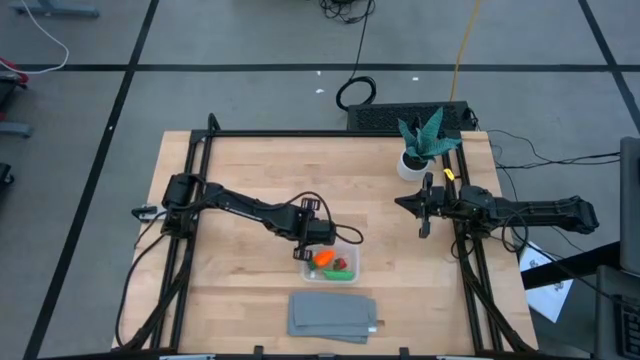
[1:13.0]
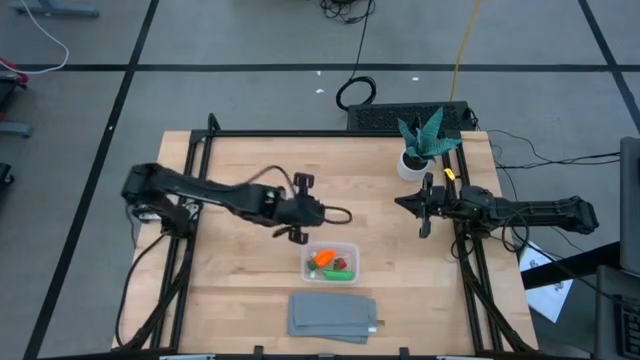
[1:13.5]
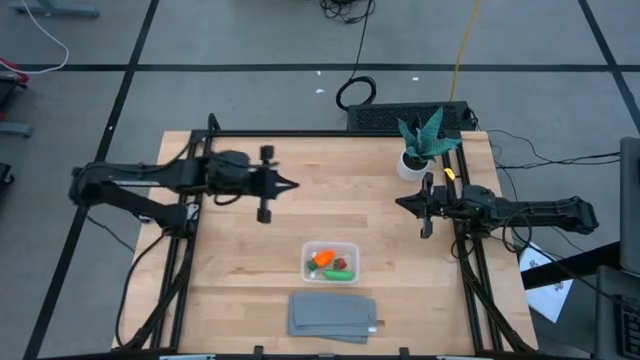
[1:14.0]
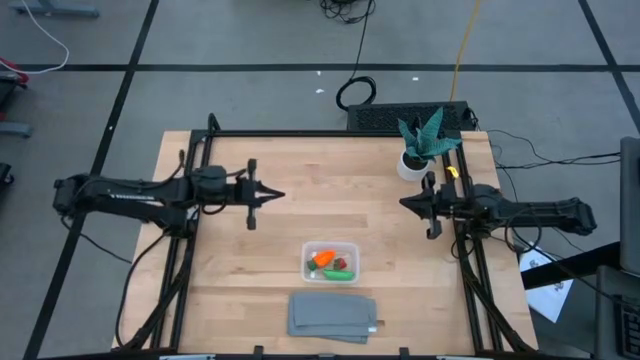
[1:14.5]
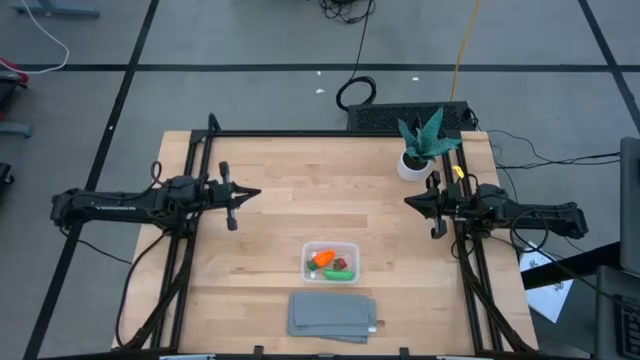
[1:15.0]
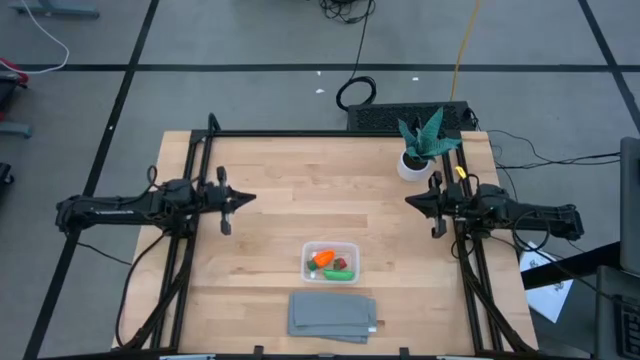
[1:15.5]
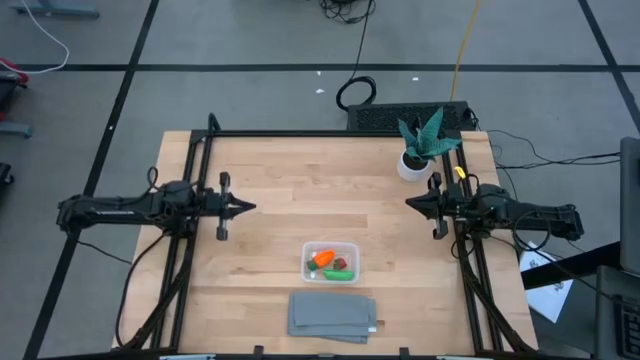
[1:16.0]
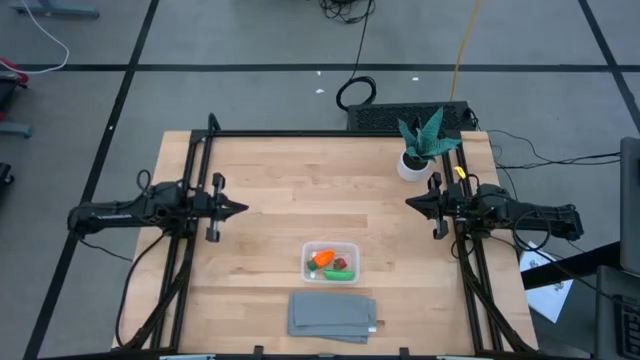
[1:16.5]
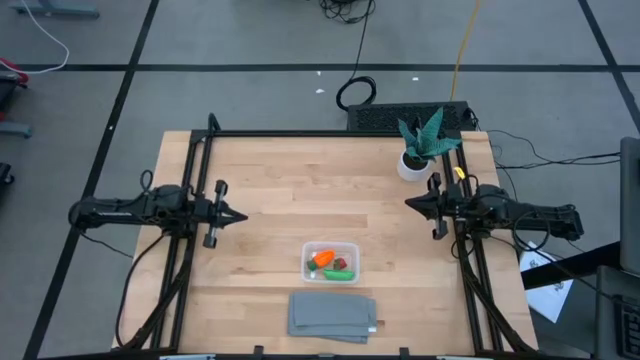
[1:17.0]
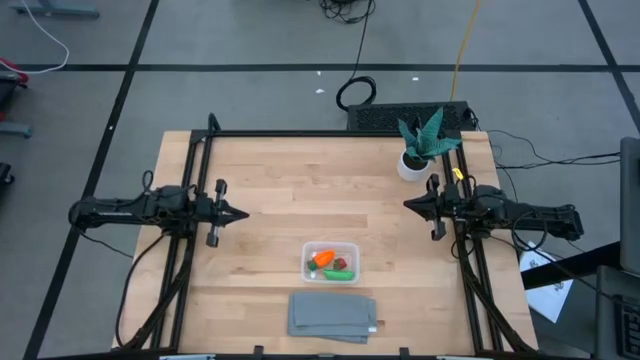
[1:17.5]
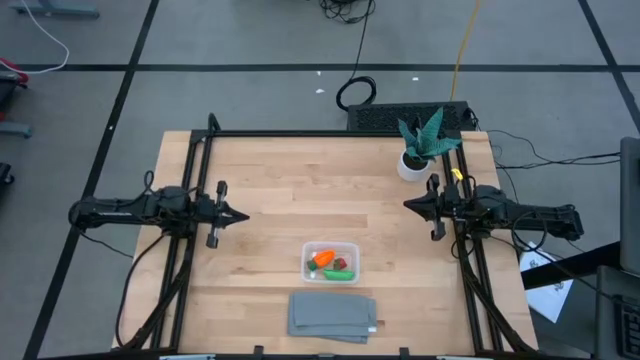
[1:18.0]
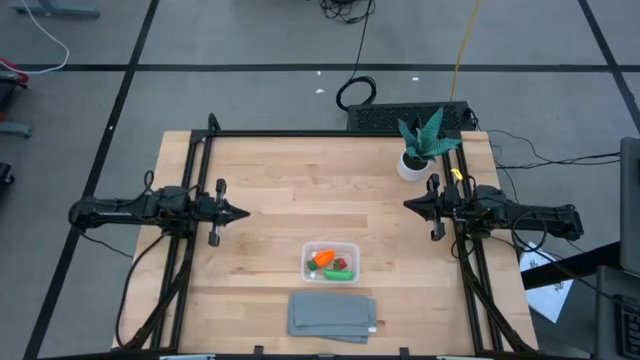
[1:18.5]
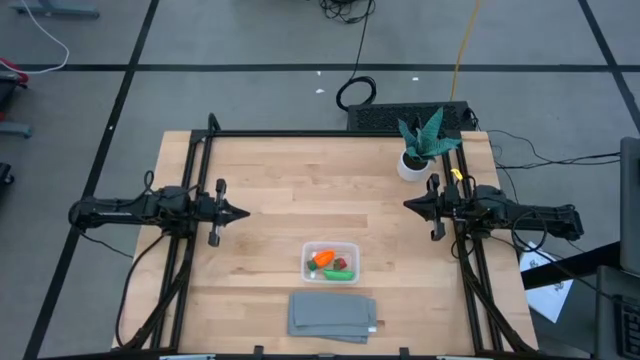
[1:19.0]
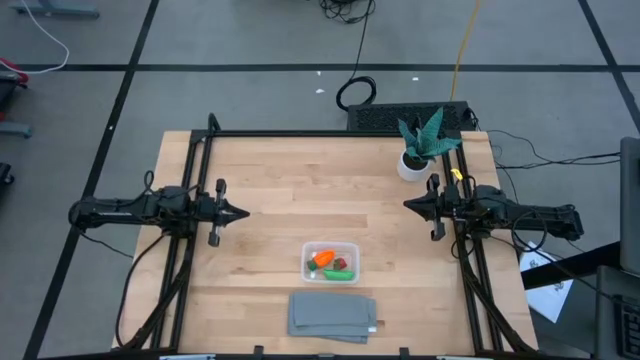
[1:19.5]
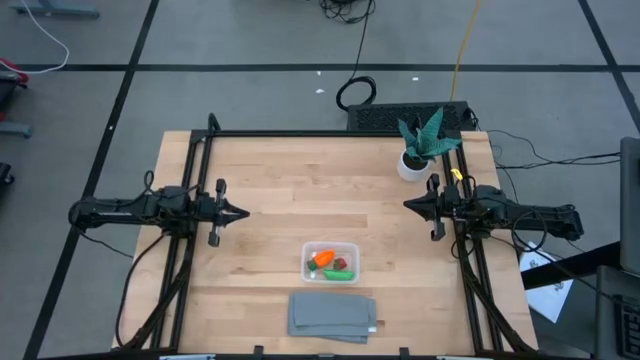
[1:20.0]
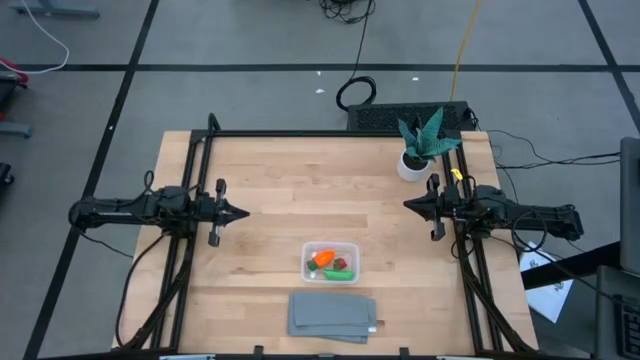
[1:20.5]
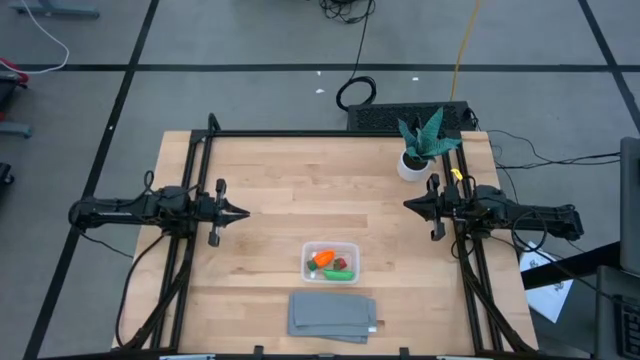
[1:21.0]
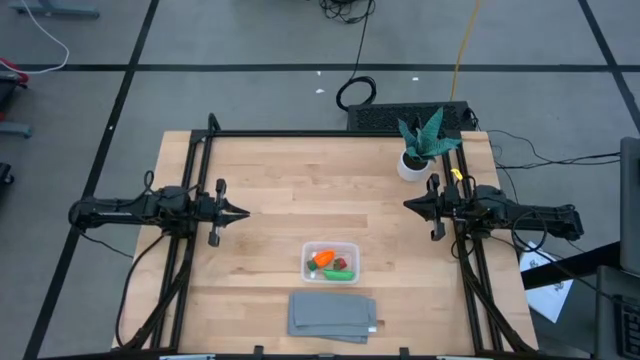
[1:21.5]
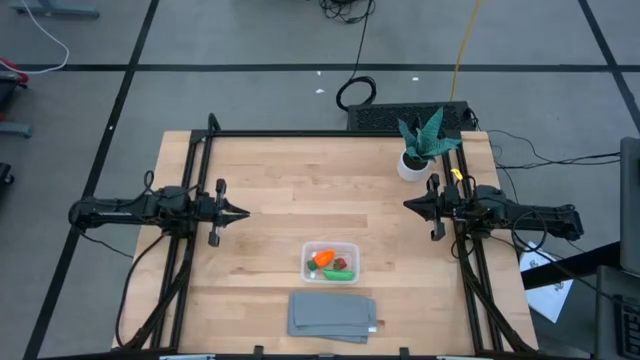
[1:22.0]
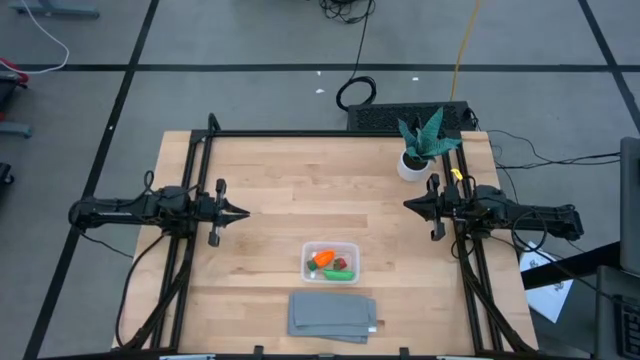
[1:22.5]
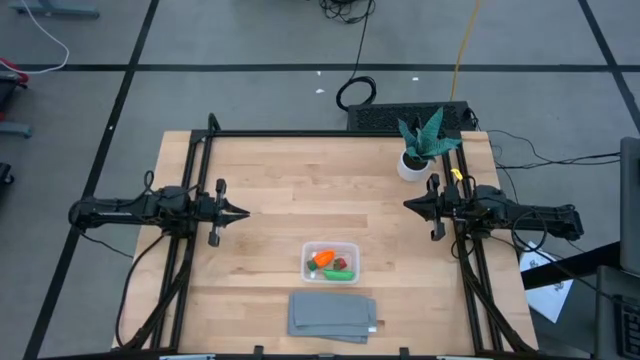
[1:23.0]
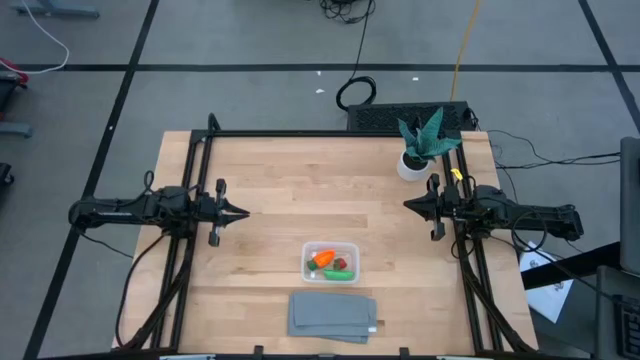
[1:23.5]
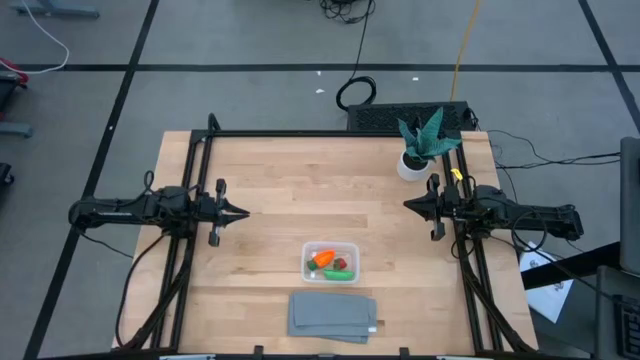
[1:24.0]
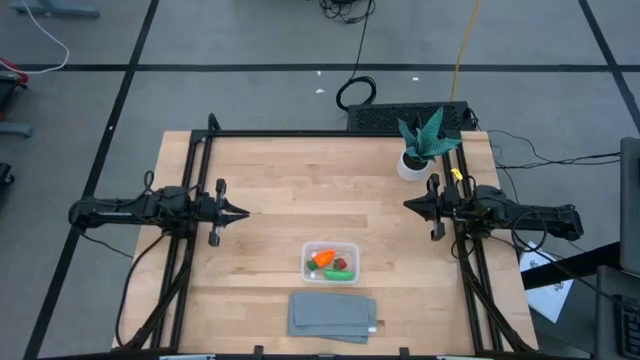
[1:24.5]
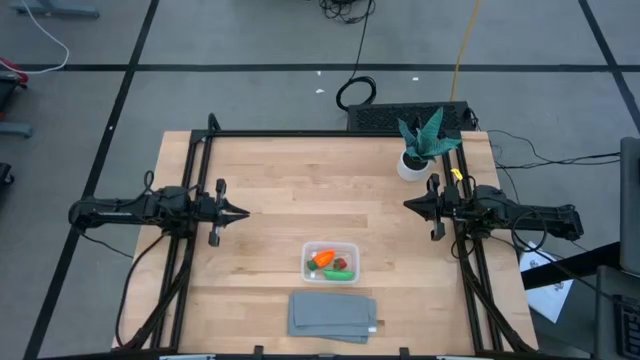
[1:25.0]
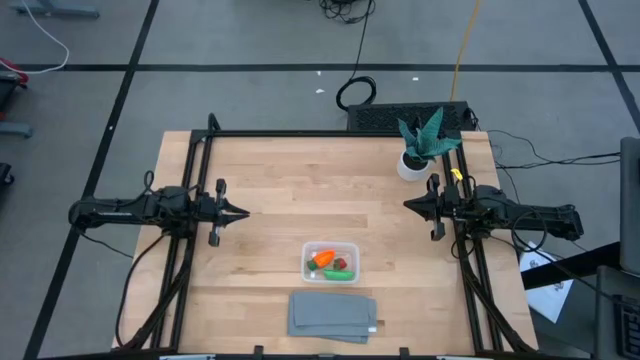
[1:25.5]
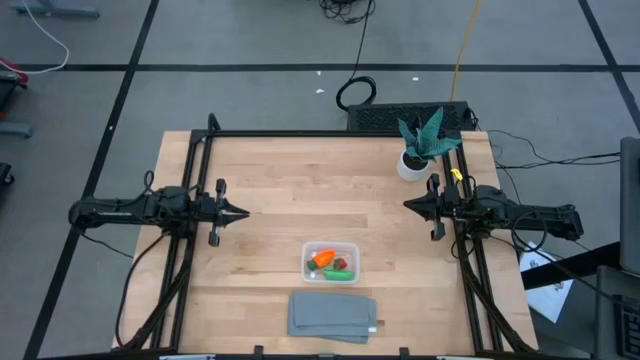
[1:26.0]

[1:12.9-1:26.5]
Task: Pick and placing Produce into tupperware
Return to Home Position

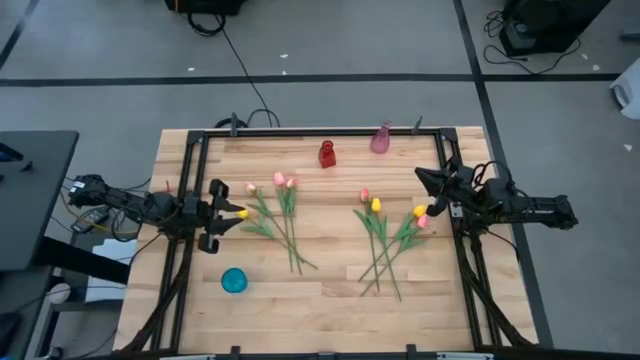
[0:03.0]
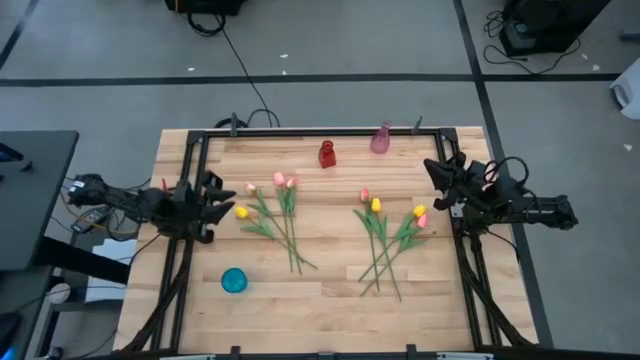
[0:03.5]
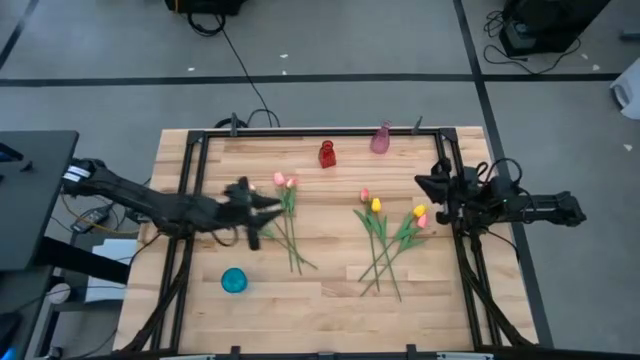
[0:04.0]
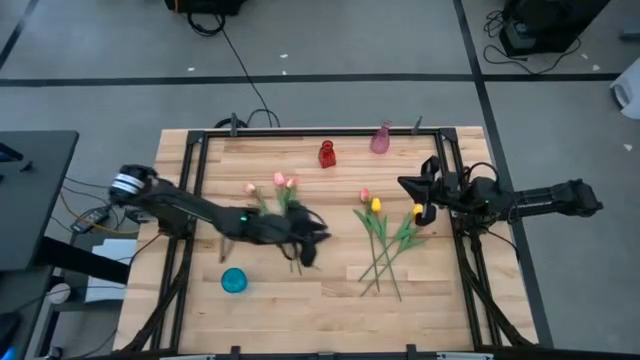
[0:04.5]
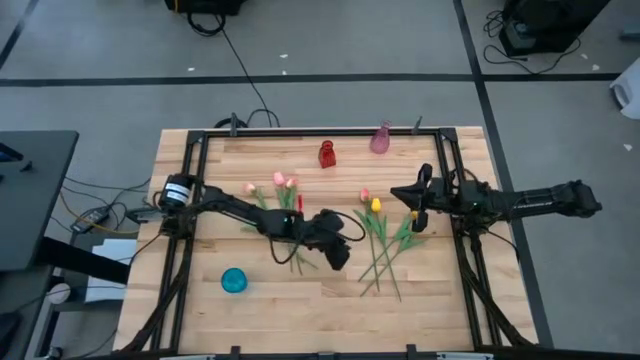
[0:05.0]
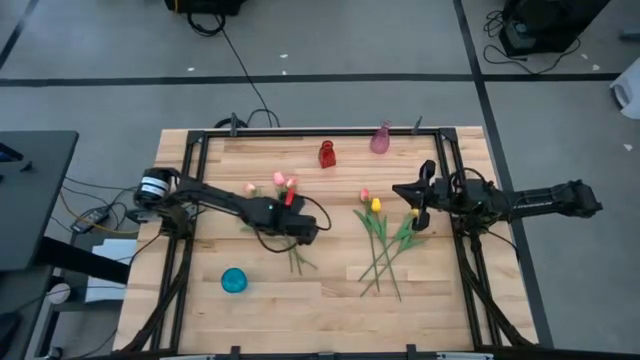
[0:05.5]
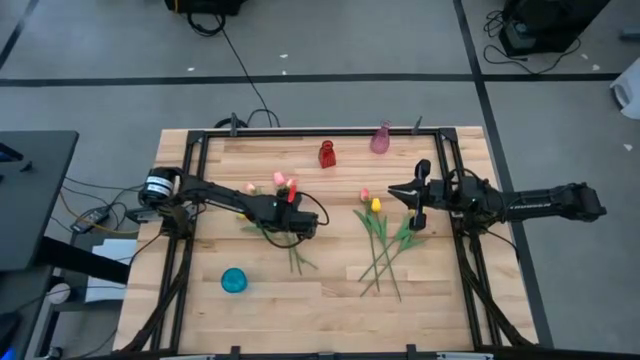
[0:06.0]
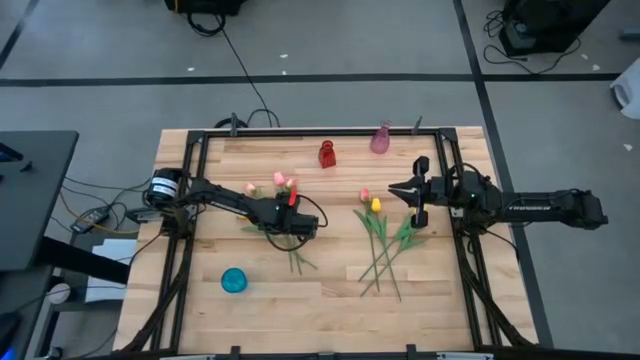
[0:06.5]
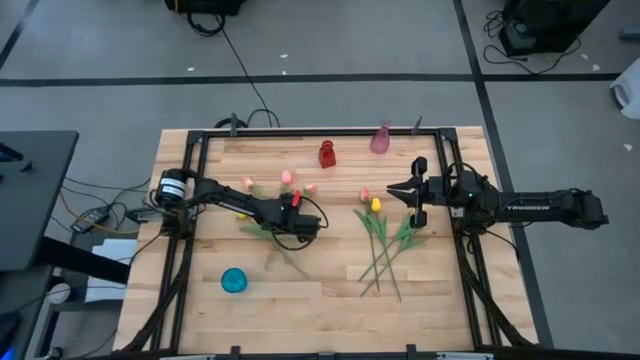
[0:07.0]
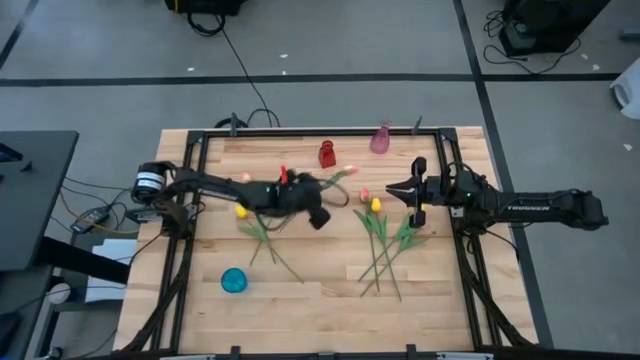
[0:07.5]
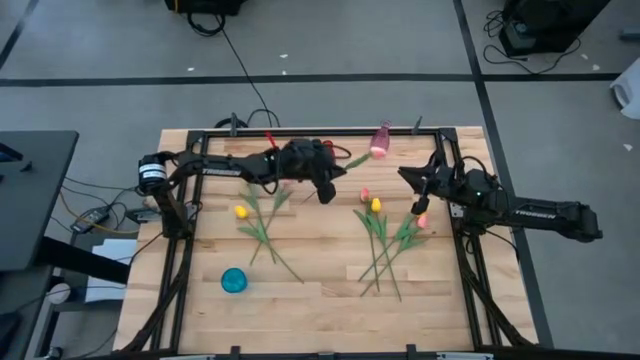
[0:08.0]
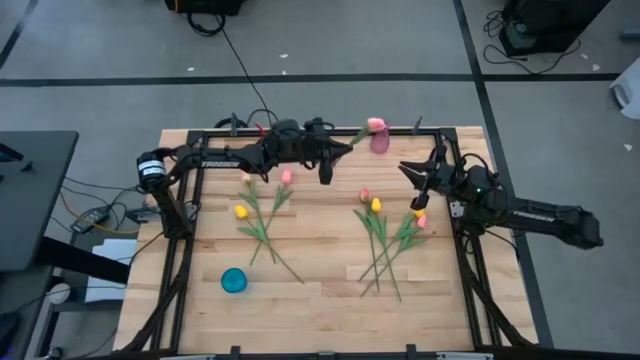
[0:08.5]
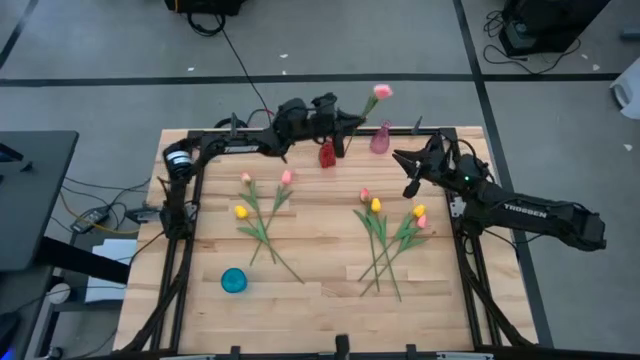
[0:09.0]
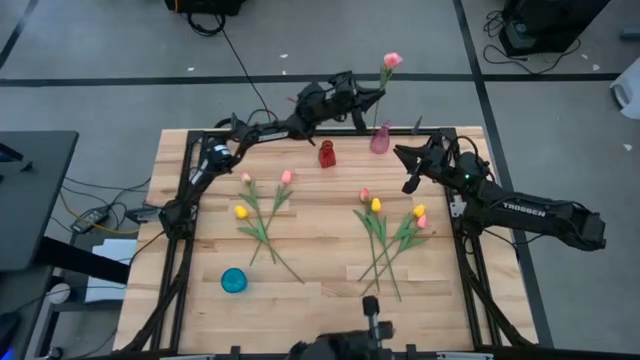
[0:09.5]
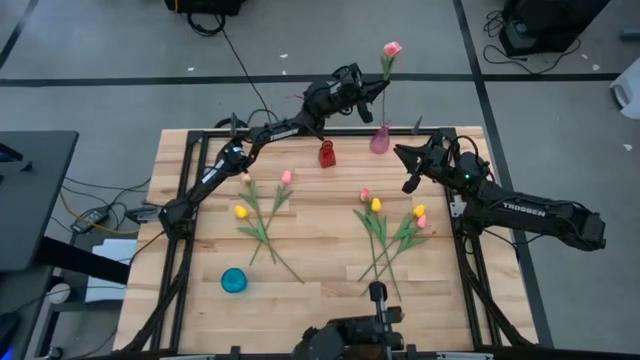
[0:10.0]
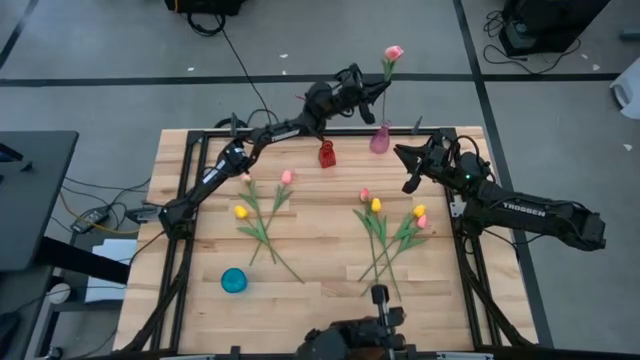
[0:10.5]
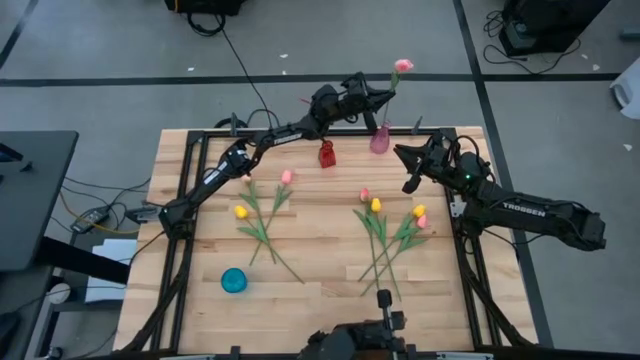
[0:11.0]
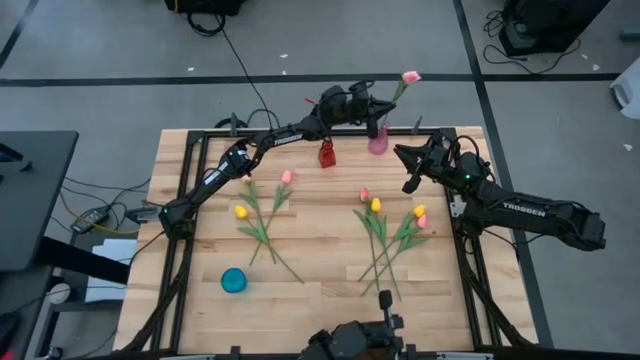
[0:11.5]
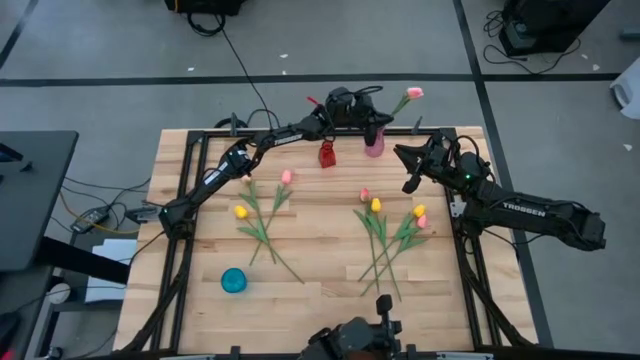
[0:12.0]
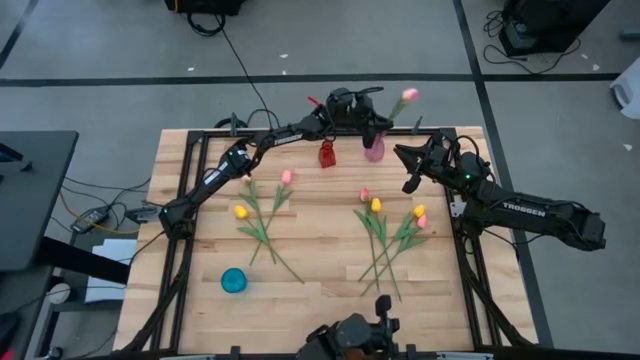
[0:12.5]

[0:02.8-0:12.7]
Task: Sort flowers into vase by color
Put the pink white tulip into the pink vase
